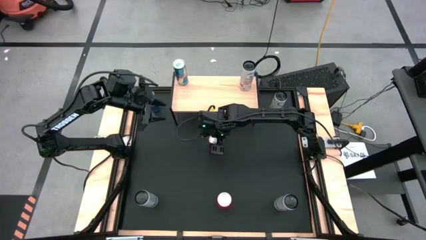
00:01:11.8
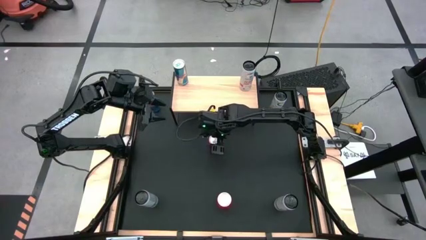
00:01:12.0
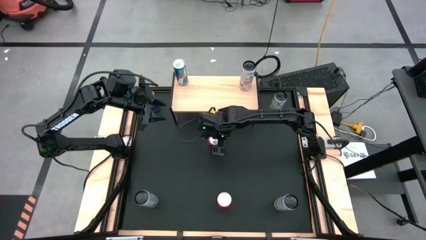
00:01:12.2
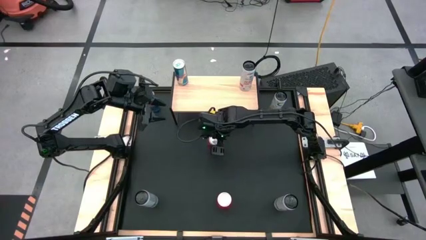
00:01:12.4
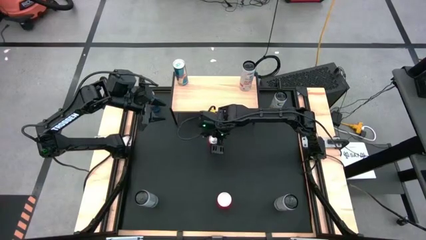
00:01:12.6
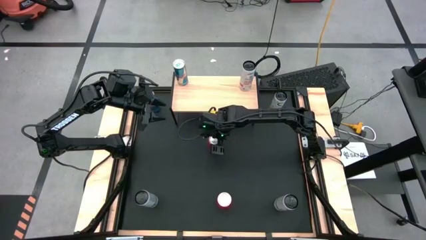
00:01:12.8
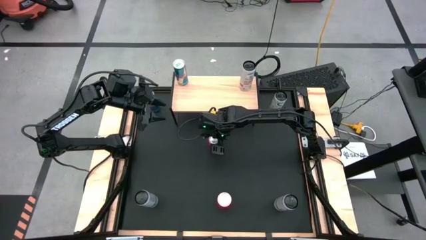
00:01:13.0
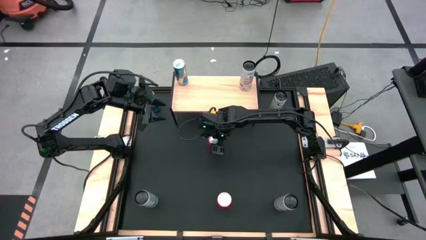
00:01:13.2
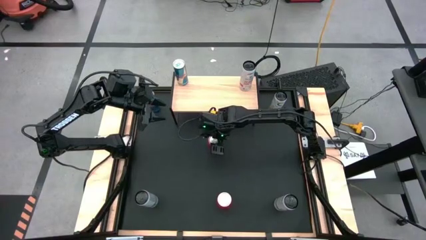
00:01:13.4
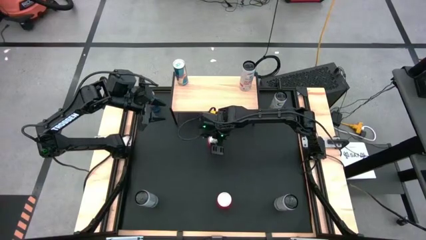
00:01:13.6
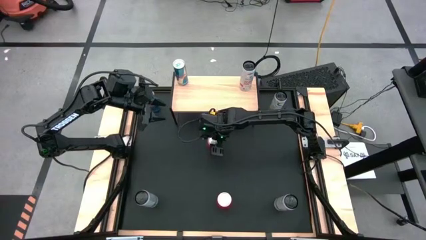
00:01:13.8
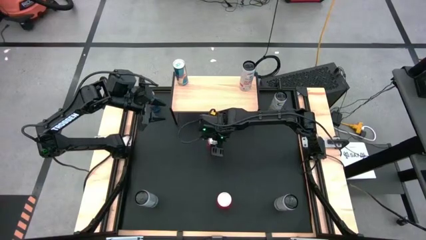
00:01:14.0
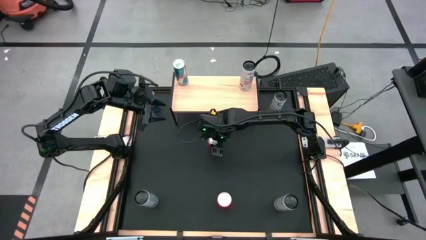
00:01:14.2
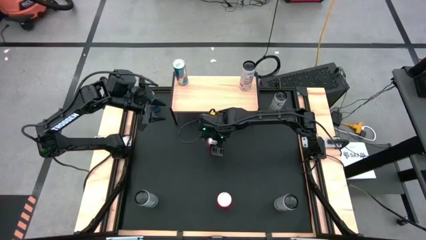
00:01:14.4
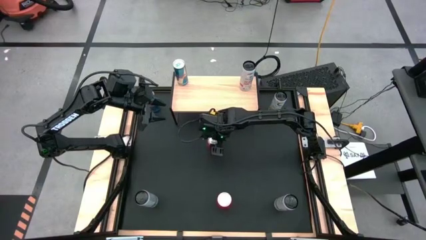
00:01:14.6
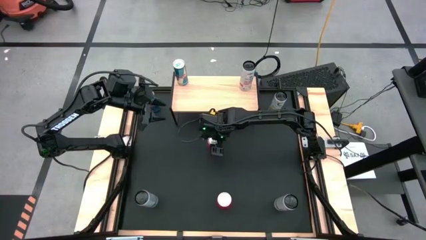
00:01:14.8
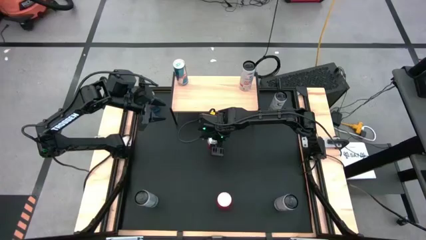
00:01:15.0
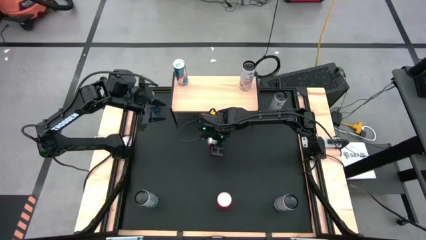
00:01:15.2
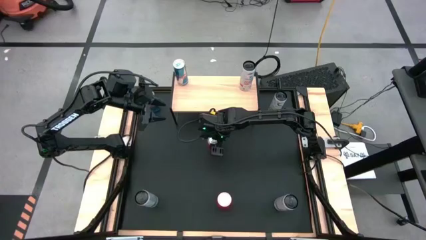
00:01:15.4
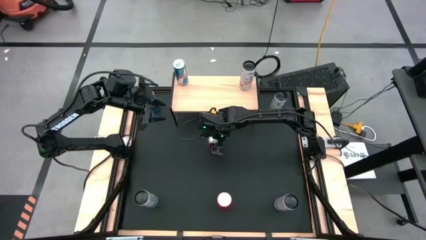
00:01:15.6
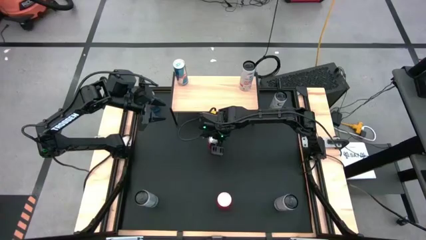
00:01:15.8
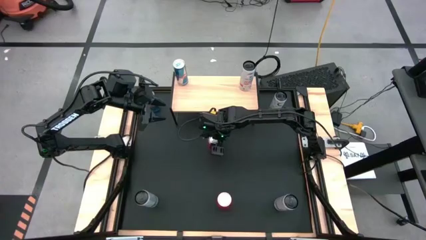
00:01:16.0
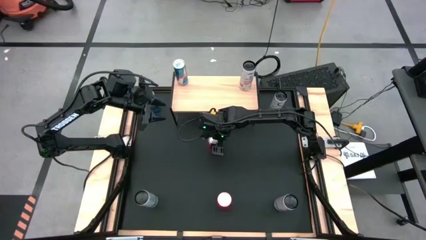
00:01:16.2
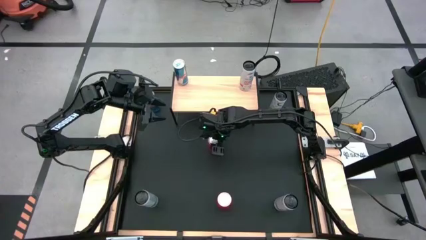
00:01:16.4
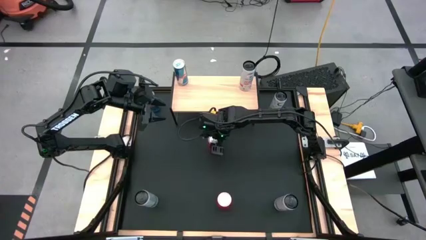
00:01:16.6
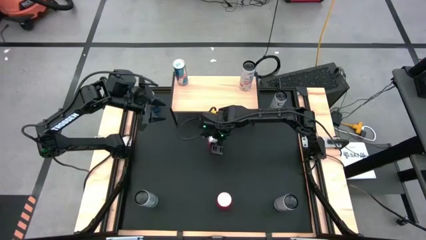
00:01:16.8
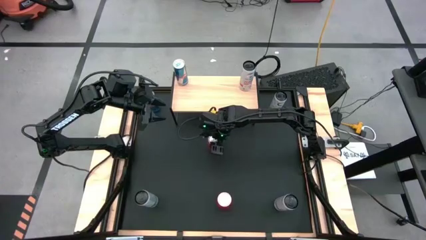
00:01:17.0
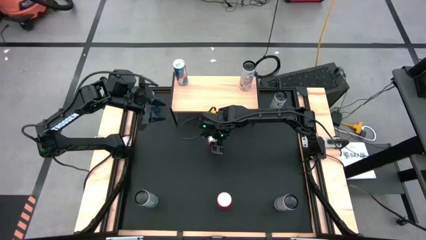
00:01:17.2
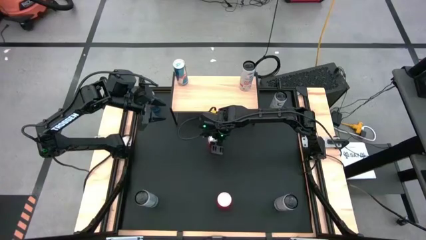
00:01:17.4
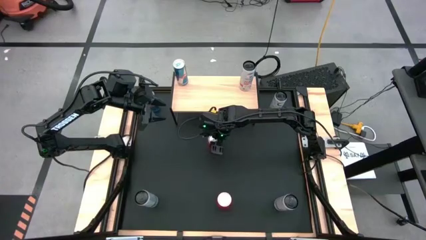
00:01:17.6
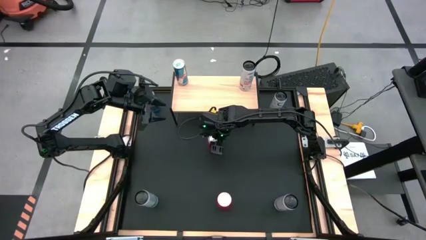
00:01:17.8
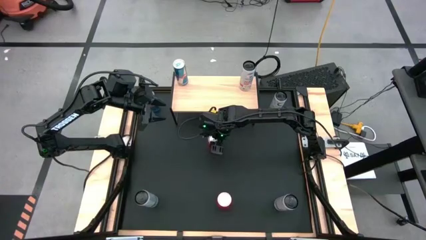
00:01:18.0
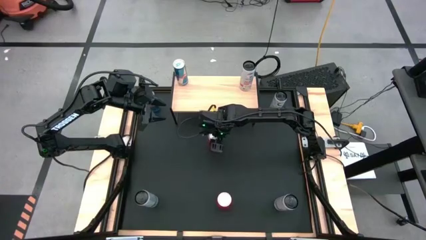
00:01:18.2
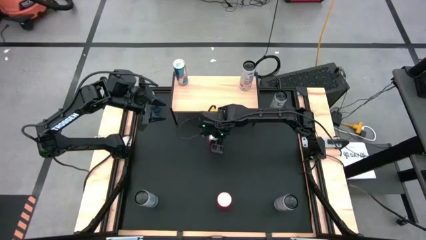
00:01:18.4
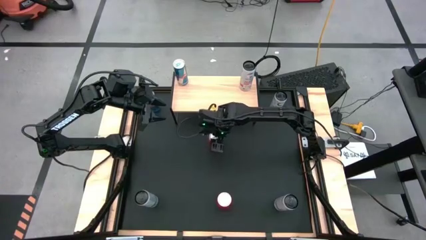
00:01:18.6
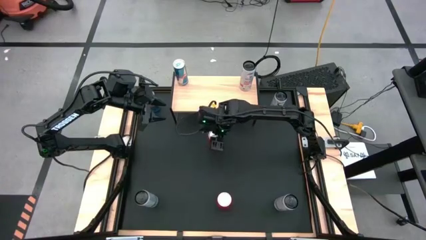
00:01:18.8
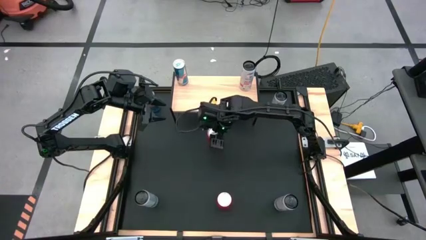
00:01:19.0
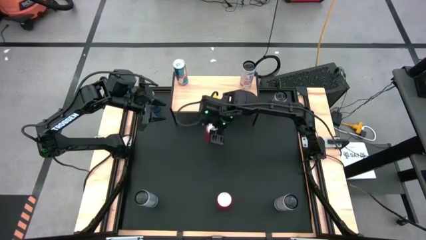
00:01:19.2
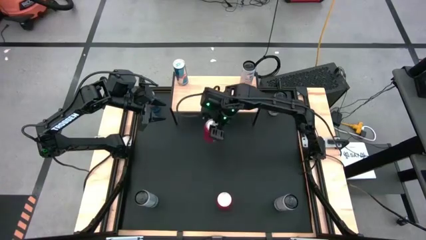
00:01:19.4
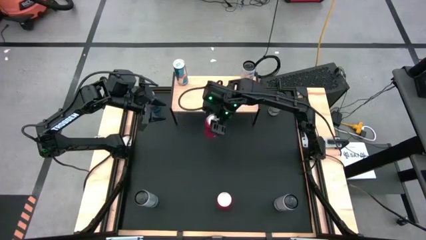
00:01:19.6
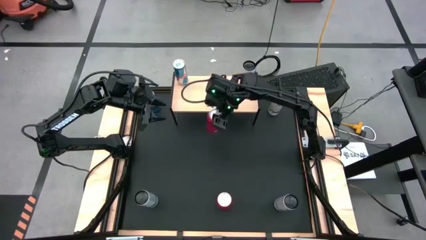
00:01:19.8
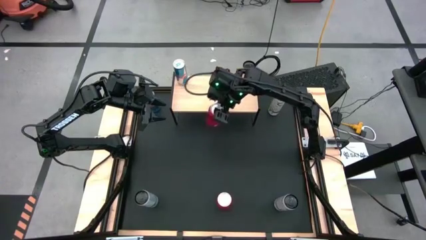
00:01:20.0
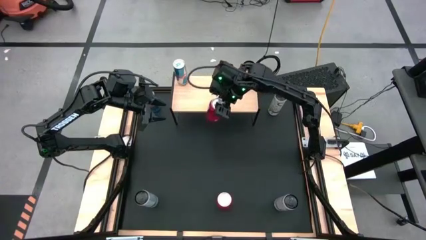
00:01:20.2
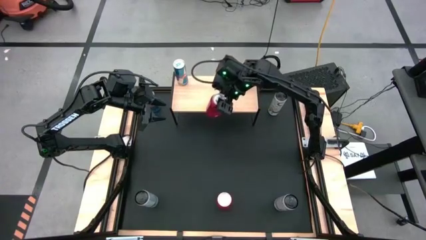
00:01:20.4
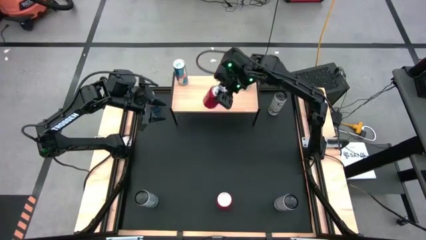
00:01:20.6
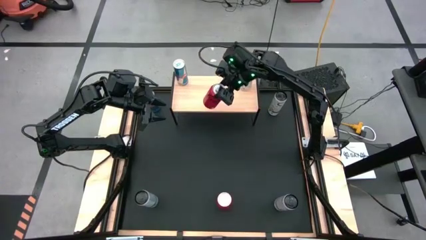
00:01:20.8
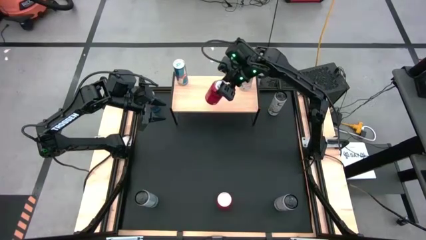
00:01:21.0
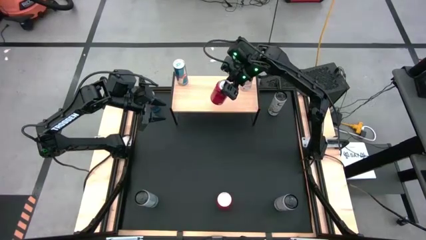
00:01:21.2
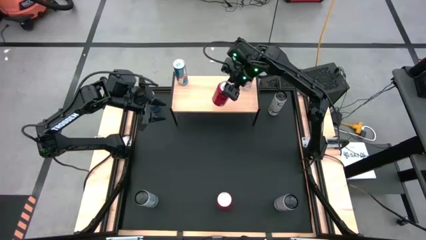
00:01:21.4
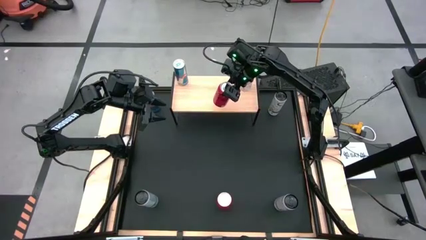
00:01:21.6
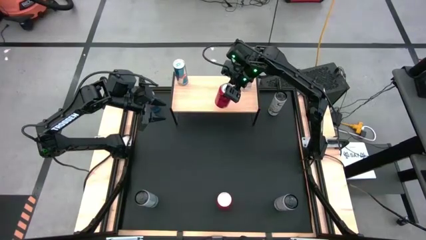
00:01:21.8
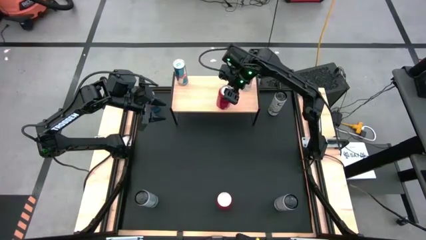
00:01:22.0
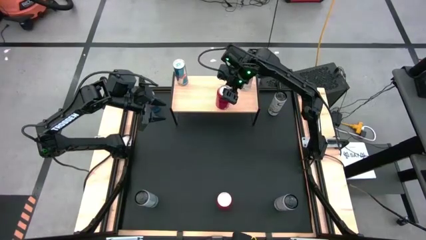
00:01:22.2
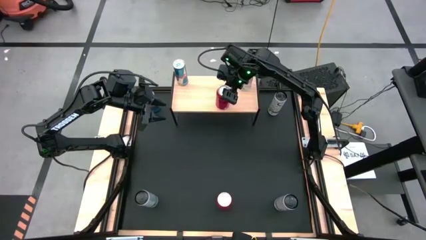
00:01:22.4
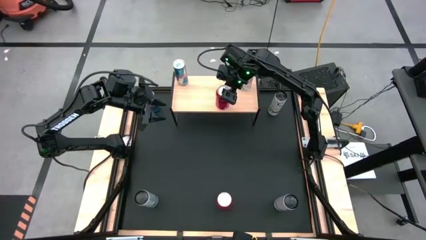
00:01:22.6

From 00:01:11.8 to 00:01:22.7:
Task: Place canned beverage on shelf
Put the top red black soda can on the shelf
